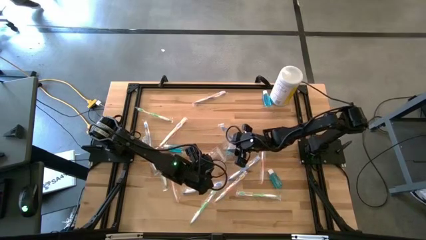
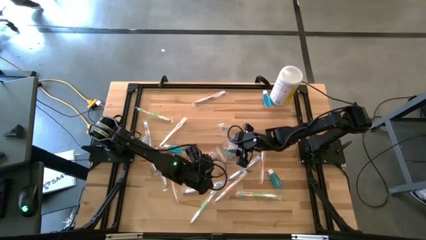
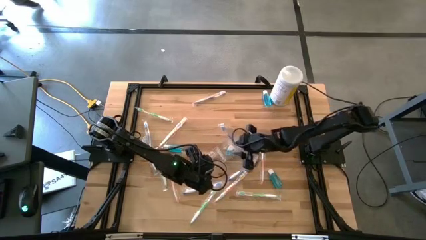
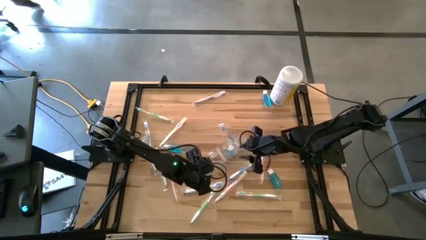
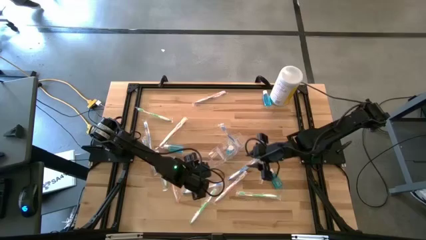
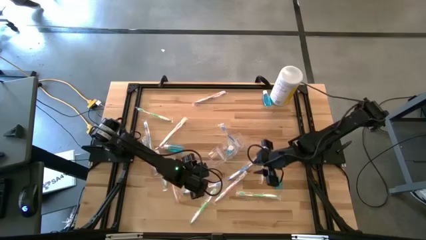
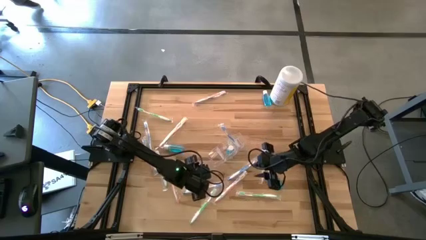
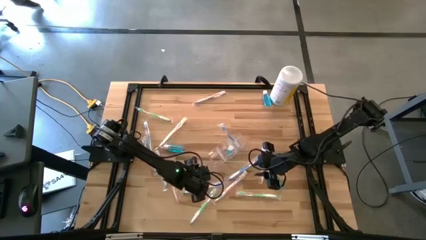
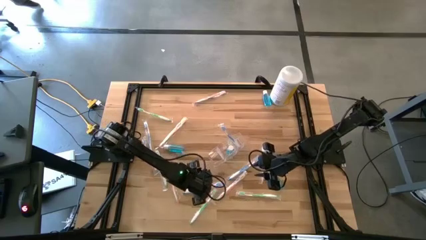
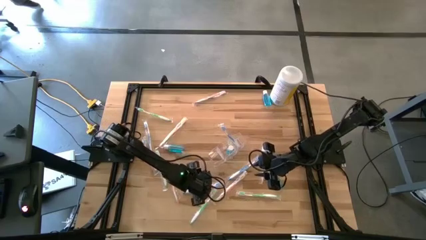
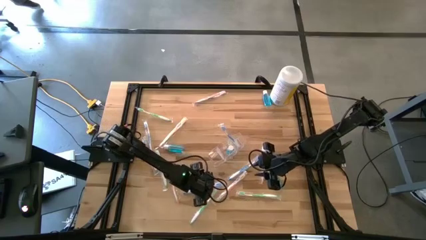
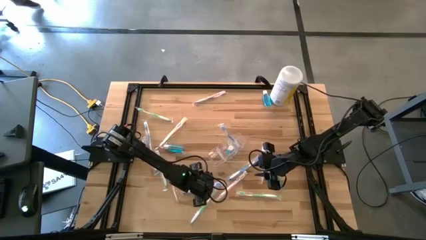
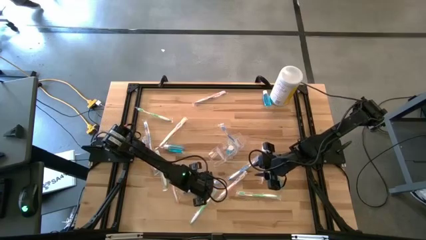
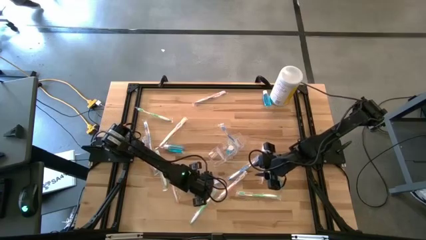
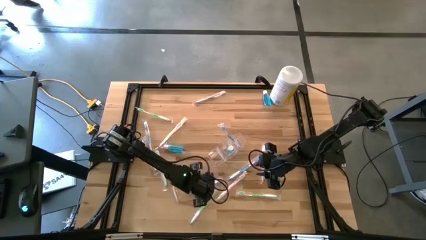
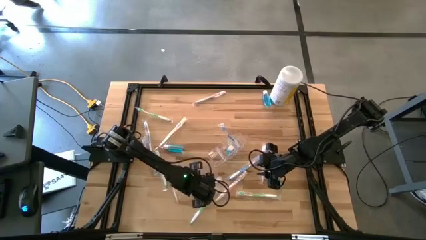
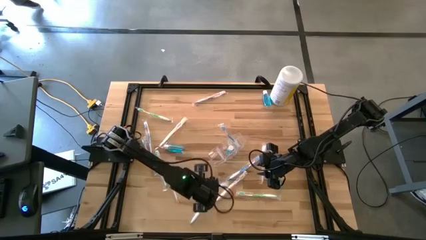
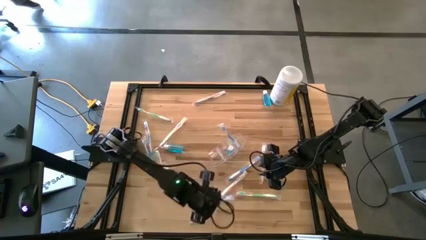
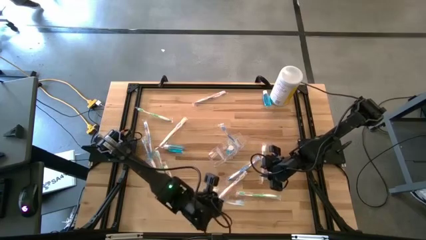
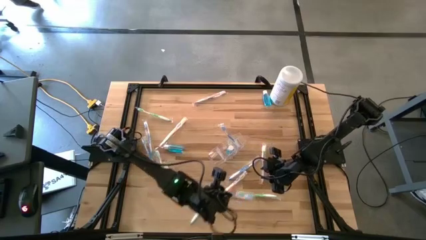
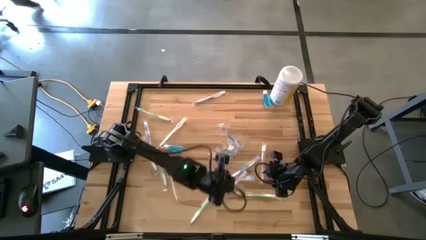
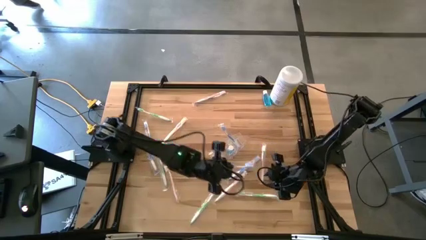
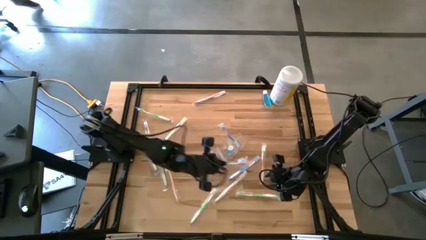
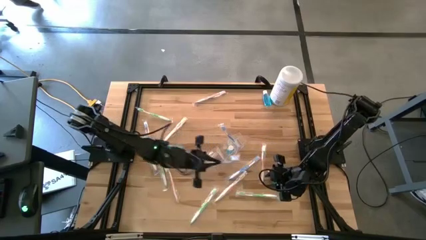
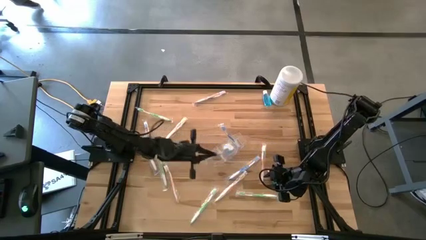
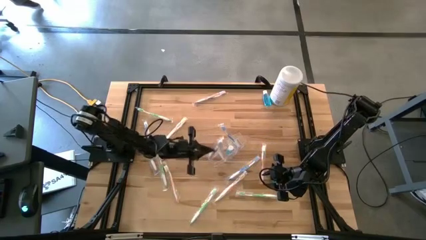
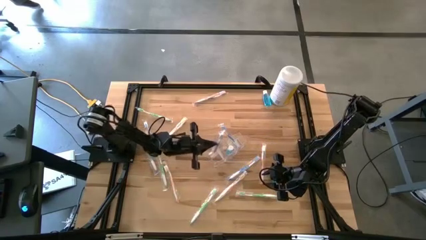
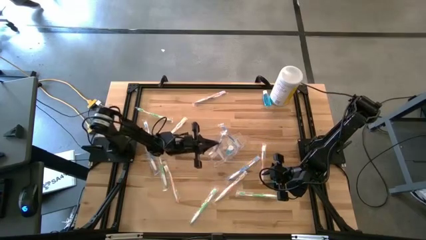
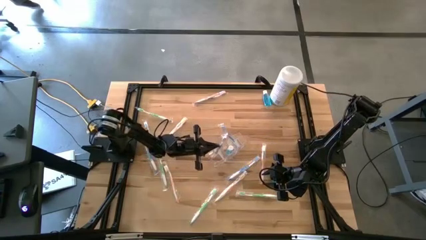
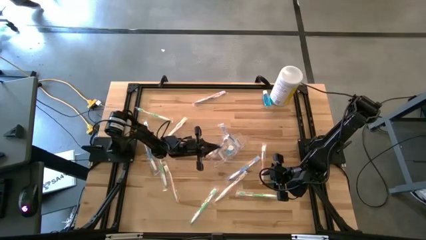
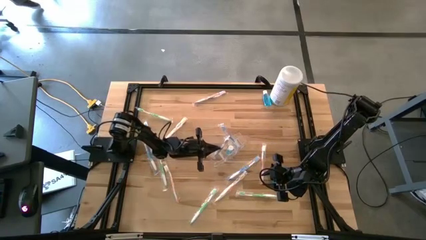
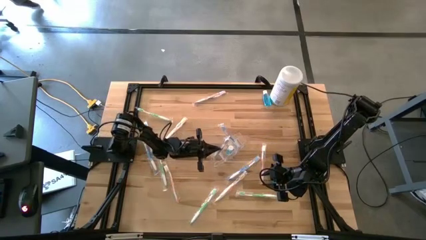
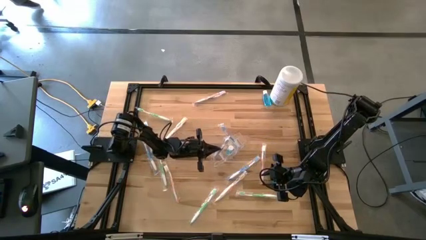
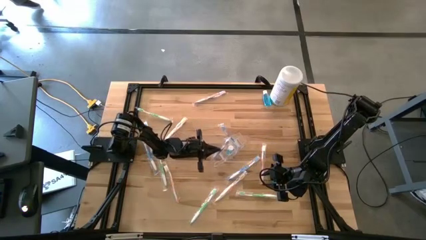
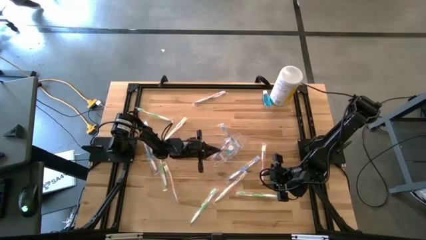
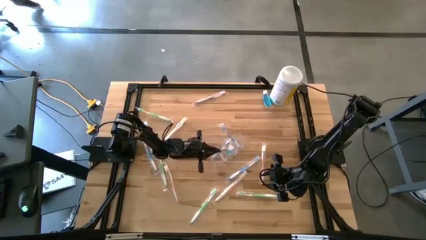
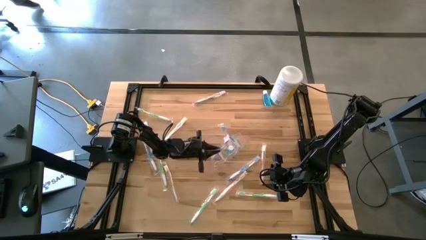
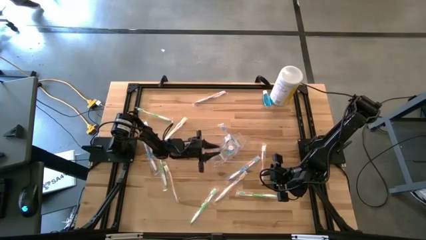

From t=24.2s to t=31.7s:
Task: Pick & Place toothbrushing station
Put the blue toothbrush into the transparent organizer
